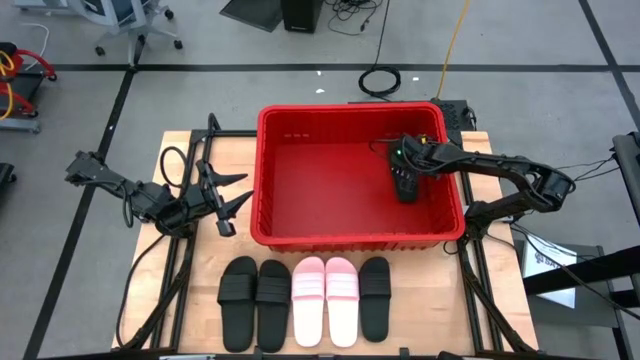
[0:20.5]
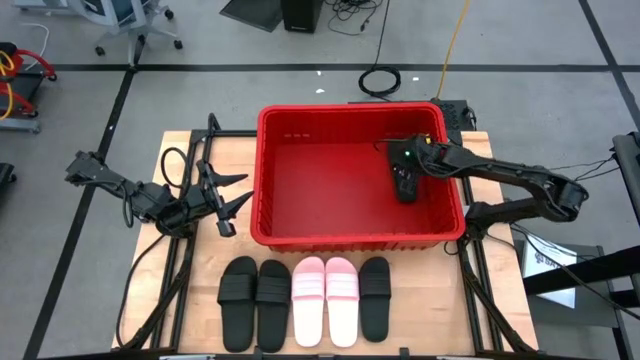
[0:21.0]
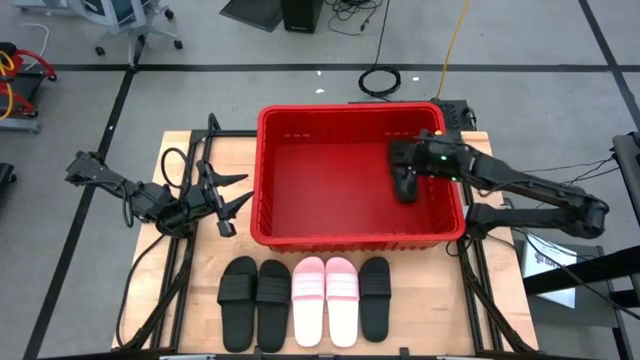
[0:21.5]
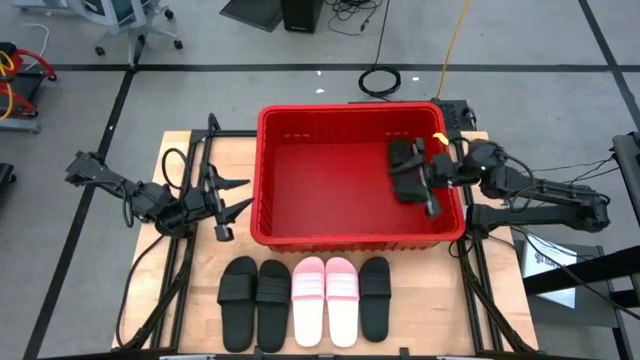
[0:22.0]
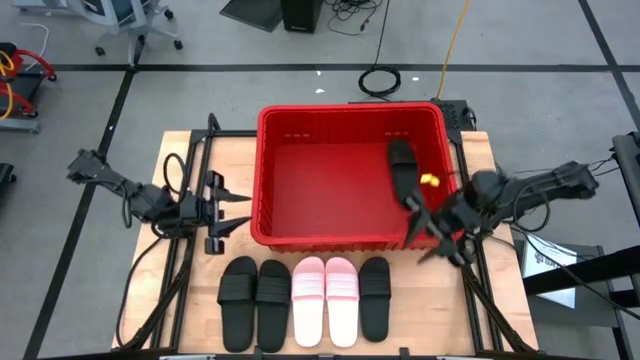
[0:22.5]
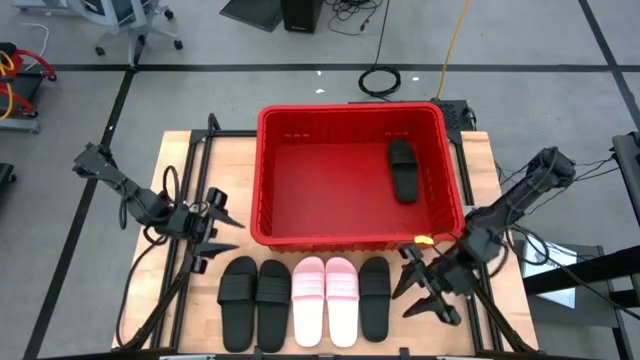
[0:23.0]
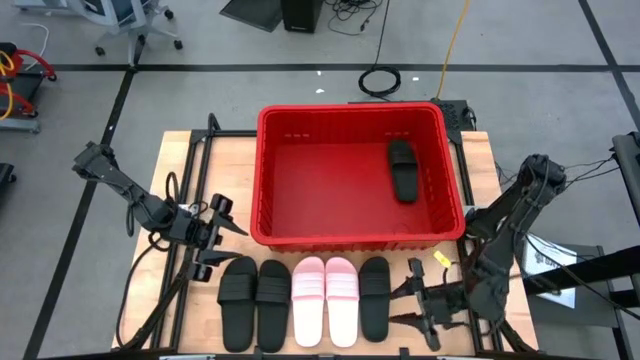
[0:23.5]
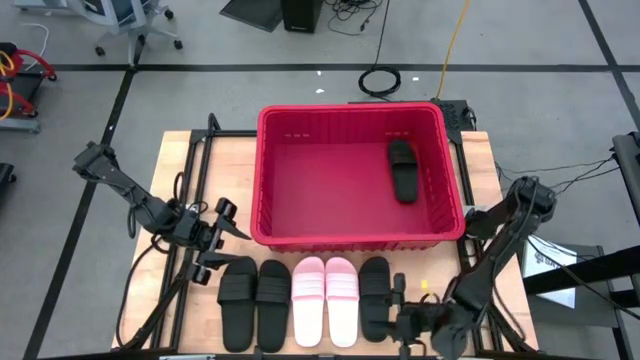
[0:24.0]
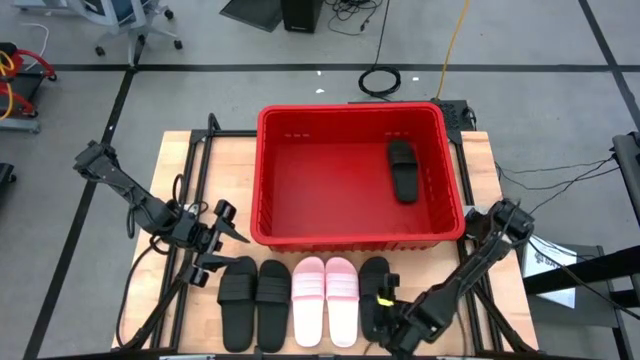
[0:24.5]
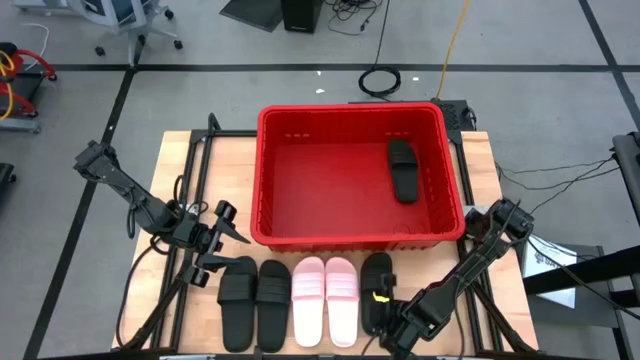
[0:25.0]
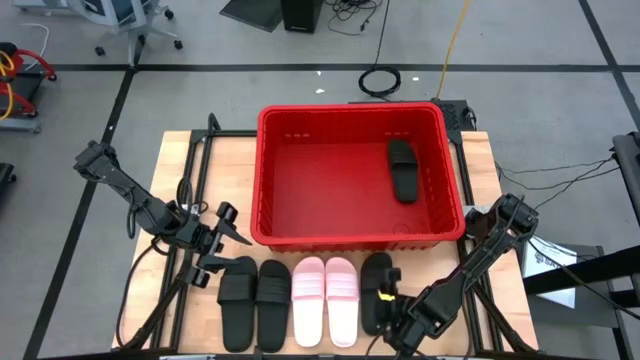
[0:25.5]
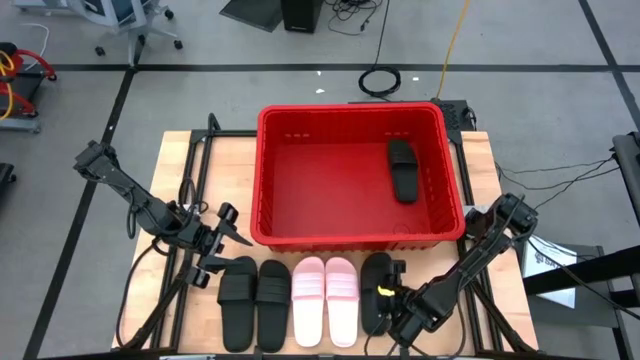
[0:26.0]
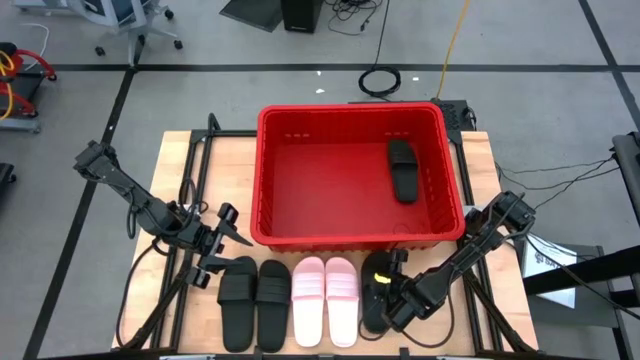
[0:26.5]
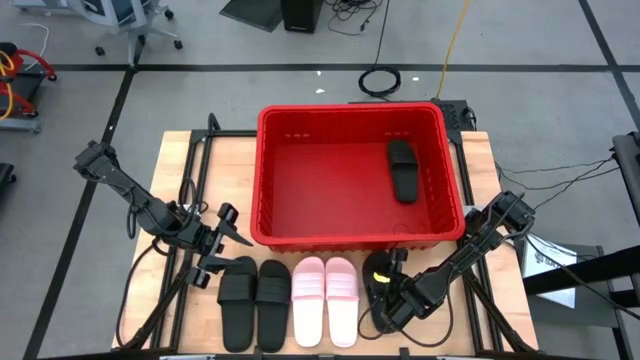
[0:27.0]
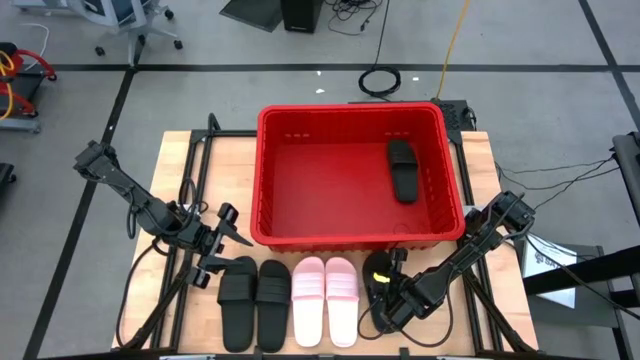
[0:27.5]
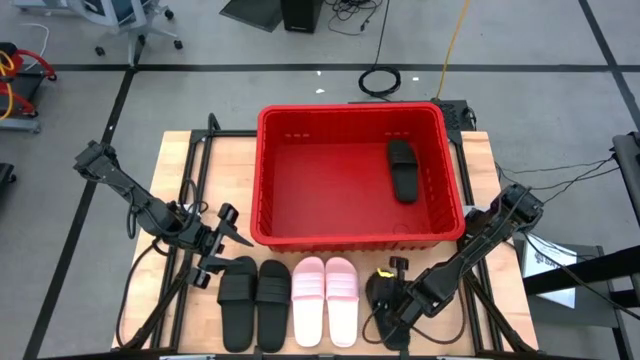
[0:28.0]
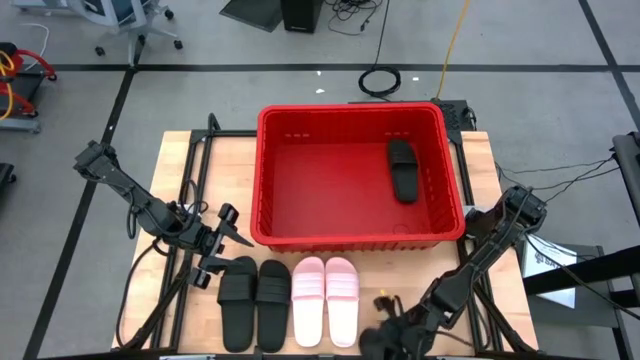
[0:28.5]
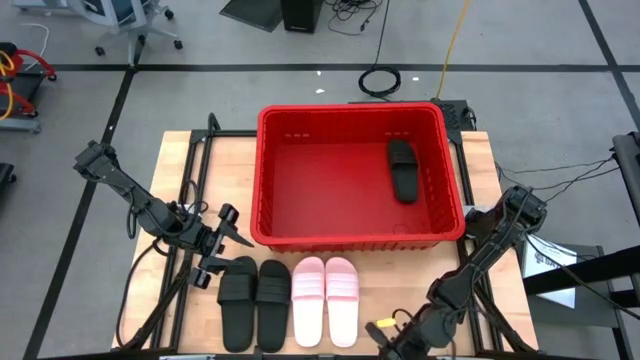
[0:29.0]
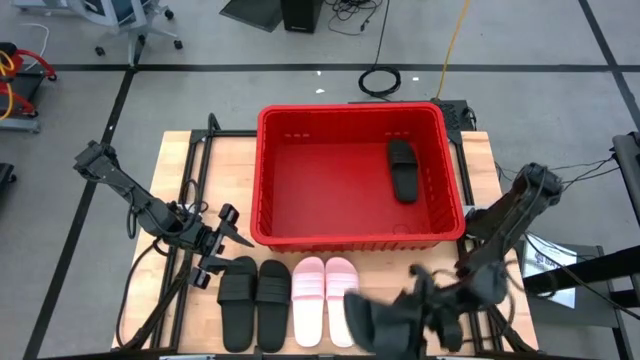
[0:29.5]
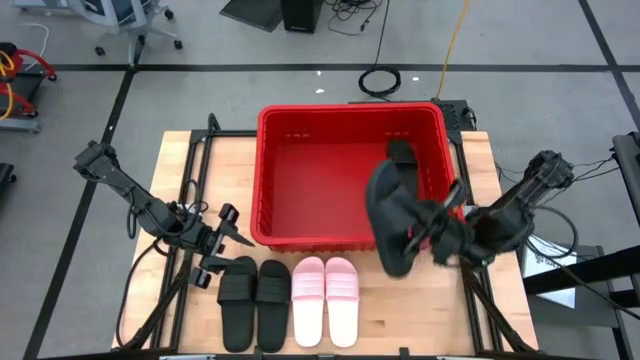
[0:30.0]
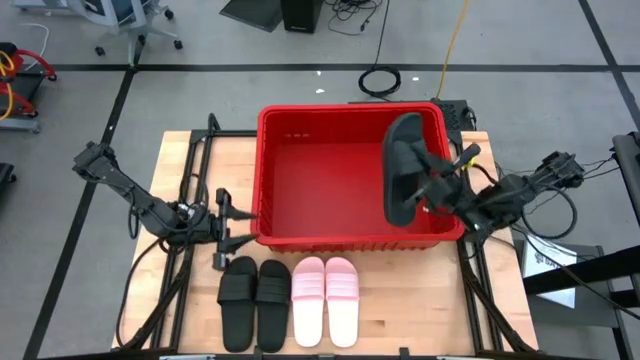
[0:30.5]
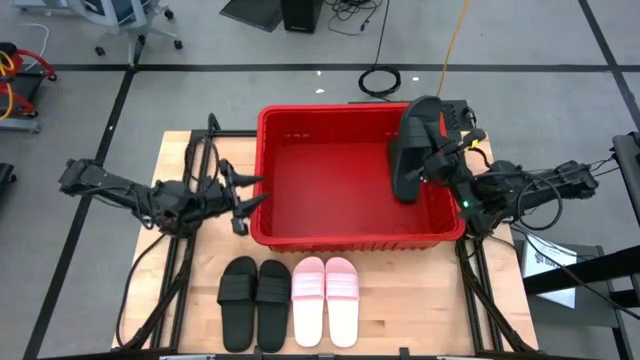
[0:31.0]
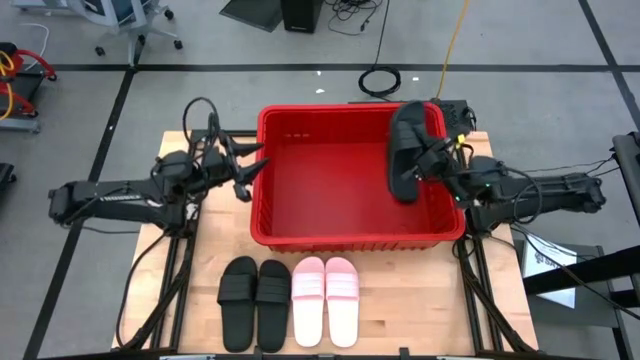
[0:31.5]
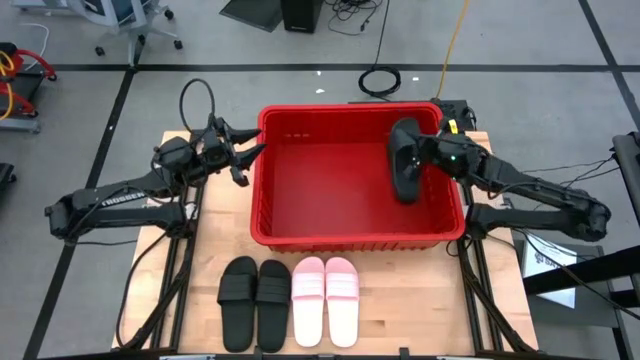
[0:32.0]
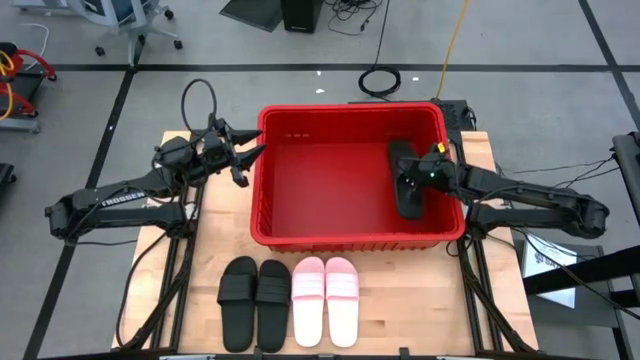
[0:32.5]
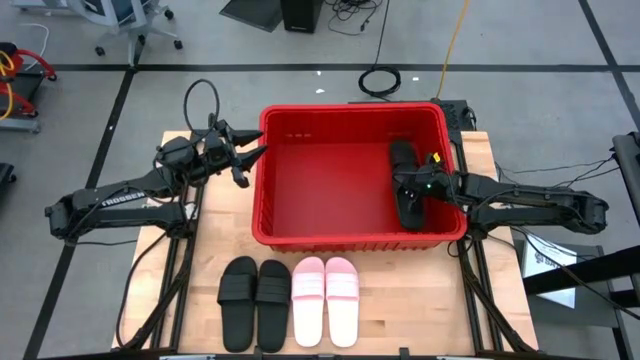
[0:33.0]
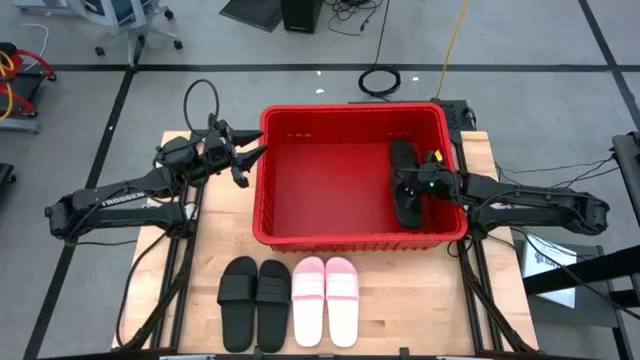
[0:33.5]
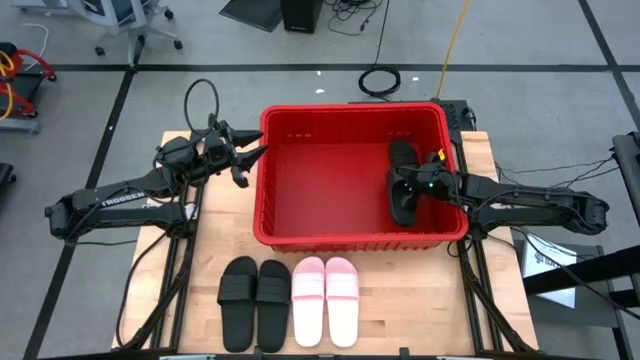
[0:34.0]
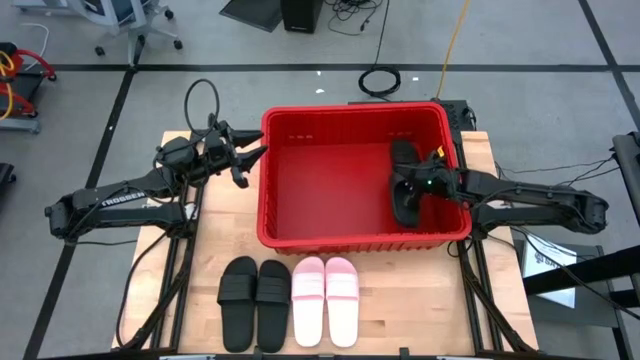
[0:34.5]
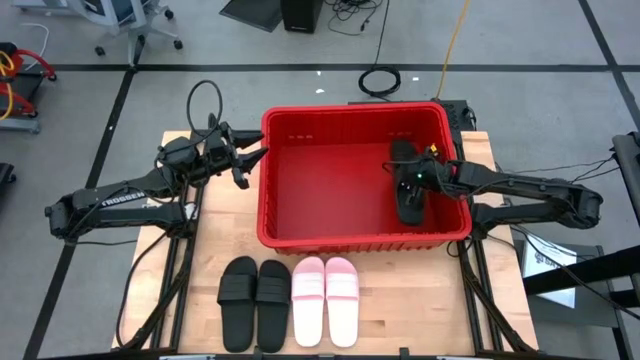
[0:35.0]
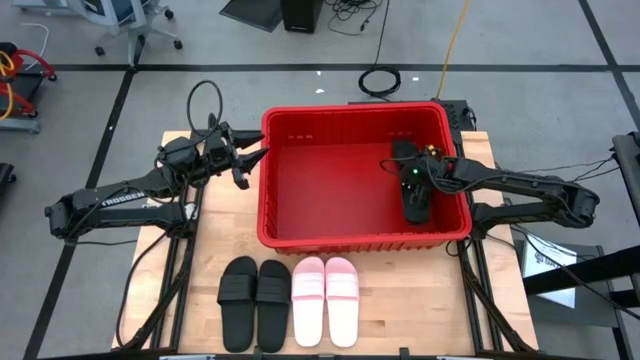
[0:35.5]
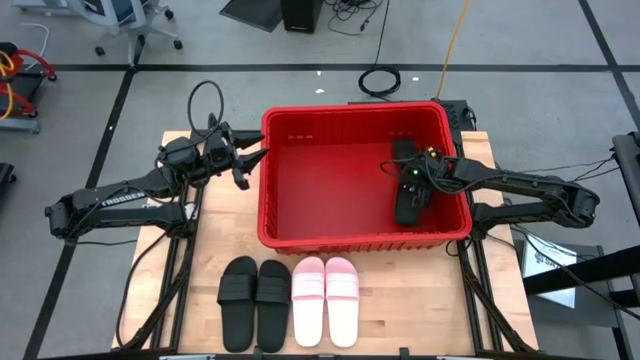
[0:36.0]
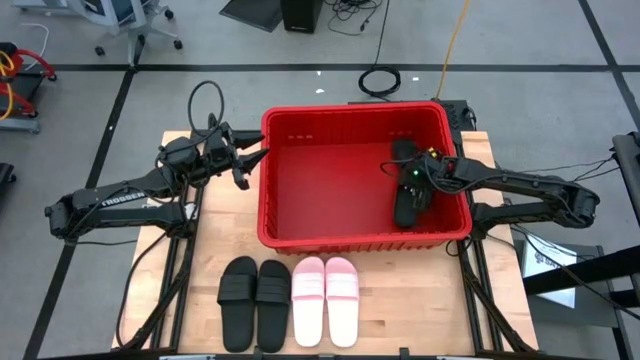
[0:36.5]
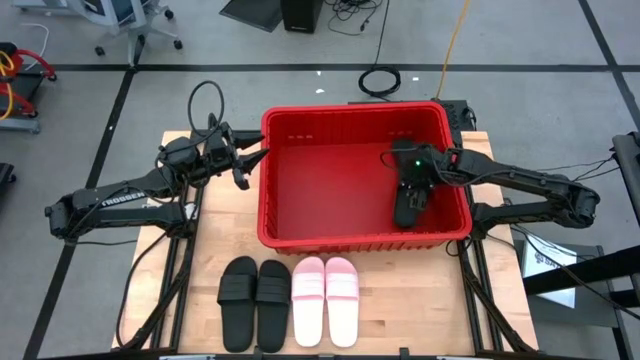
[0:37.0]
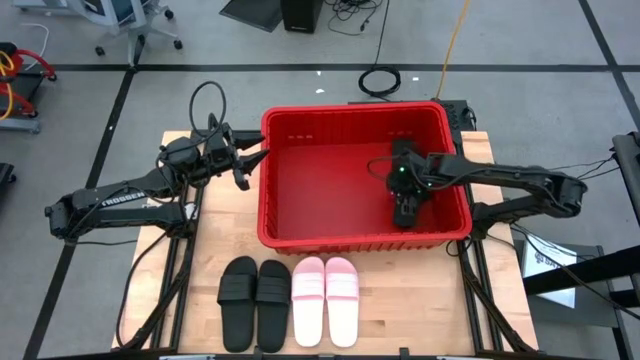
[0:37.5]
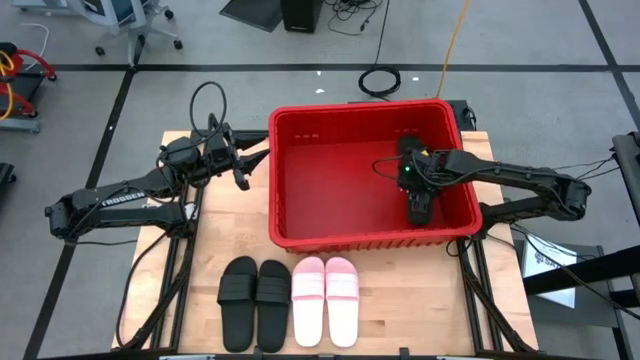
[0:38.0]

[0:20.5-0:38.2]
Task: Pick and place slides into bin
Put the black slide into the red bin

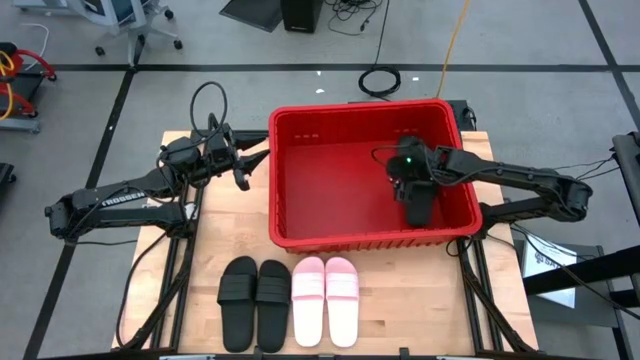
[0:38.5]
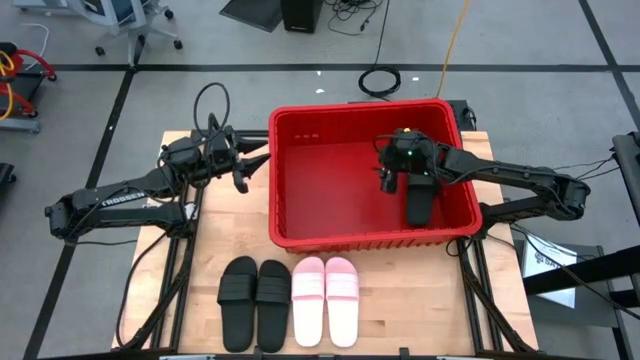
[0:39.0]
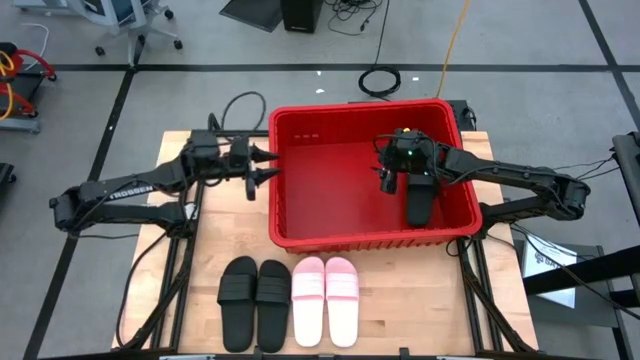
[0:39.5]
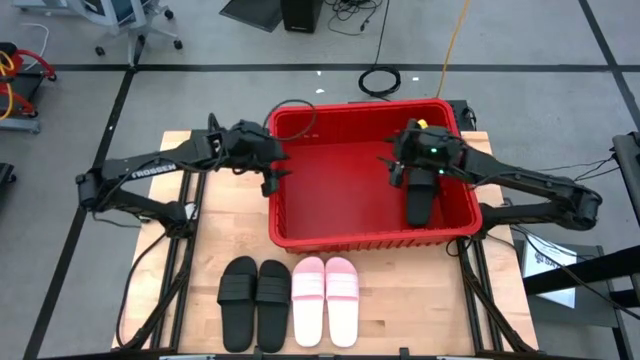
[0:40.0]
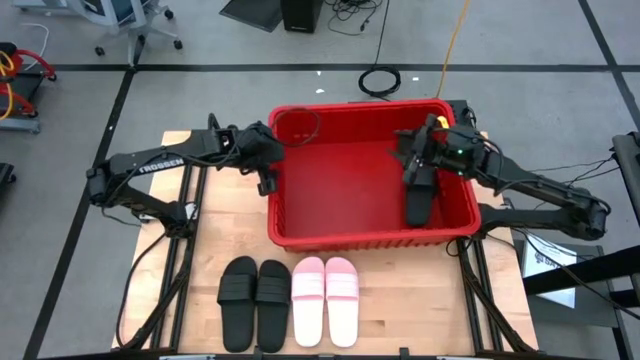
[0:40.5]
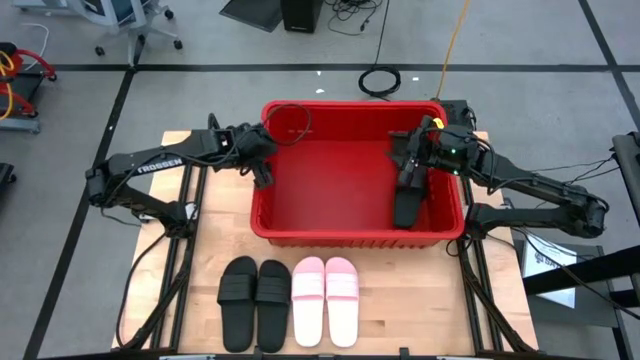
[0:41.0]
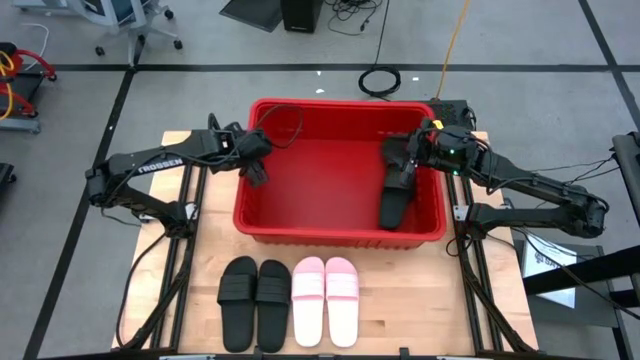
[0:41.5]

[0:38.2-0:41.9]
Adjust the red bin on the table
